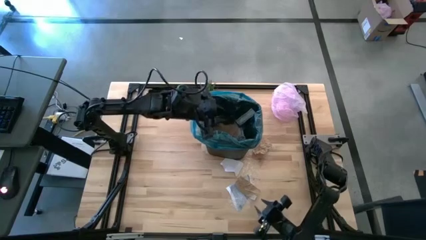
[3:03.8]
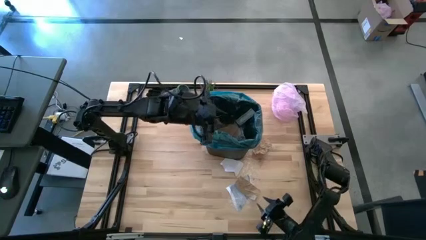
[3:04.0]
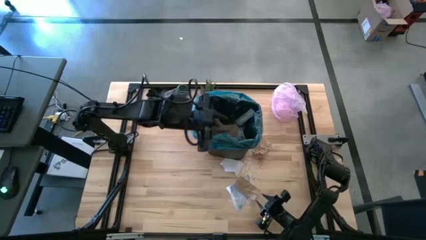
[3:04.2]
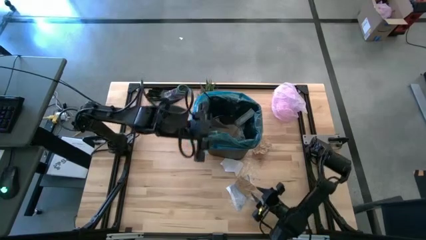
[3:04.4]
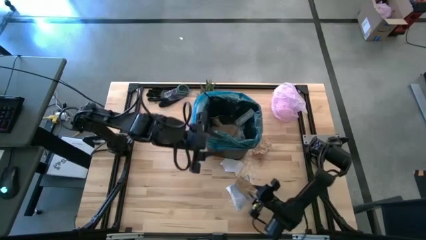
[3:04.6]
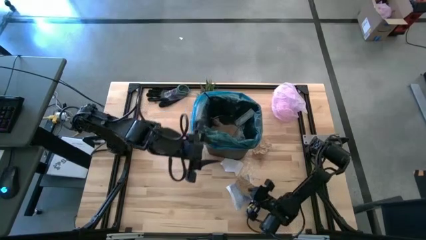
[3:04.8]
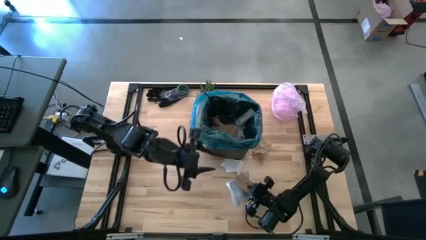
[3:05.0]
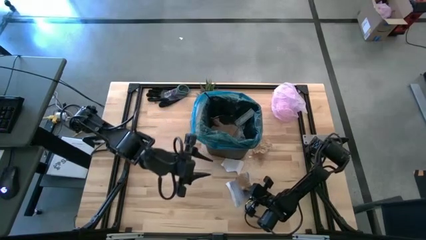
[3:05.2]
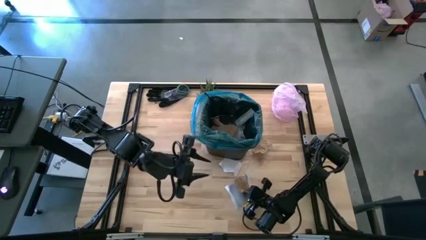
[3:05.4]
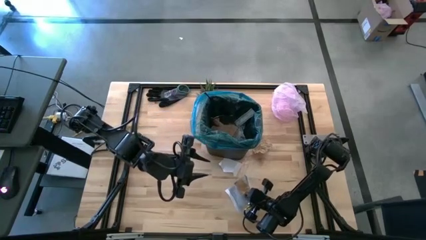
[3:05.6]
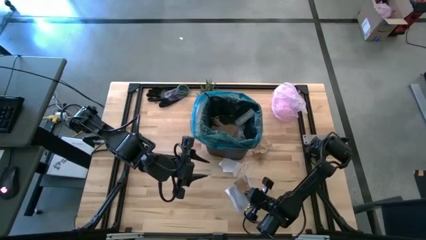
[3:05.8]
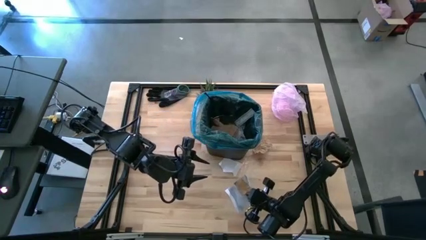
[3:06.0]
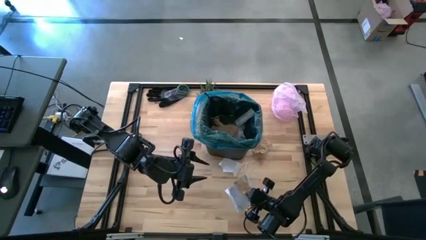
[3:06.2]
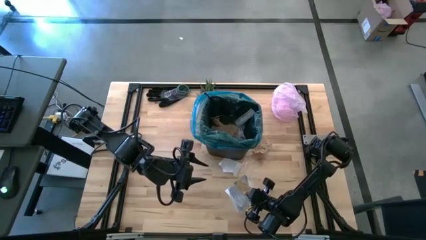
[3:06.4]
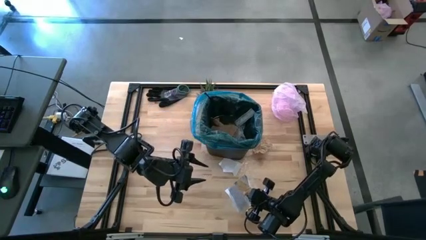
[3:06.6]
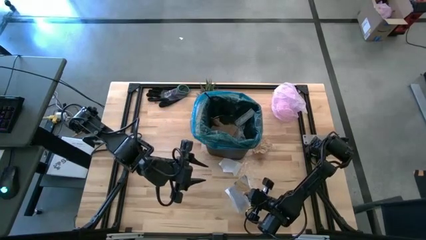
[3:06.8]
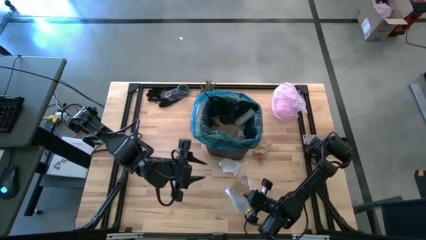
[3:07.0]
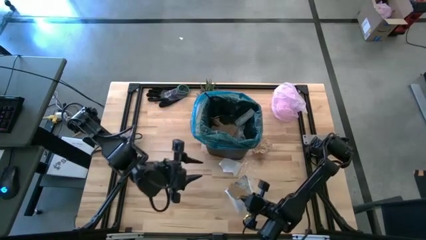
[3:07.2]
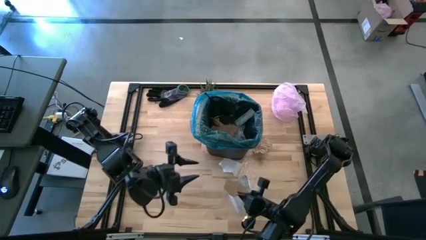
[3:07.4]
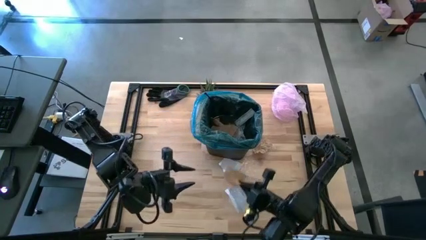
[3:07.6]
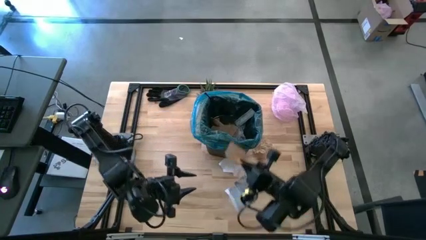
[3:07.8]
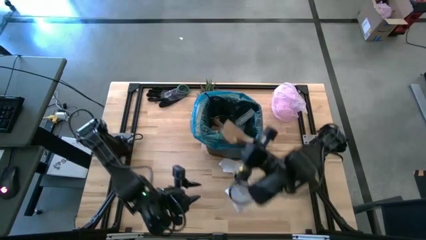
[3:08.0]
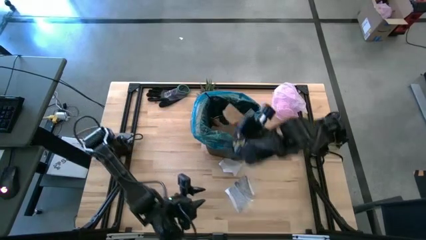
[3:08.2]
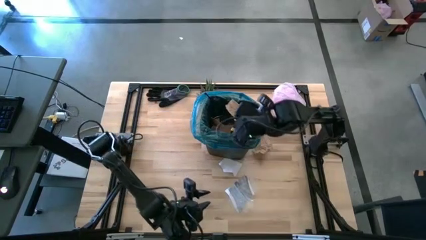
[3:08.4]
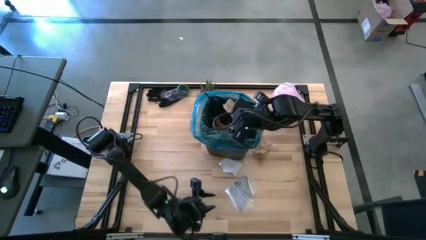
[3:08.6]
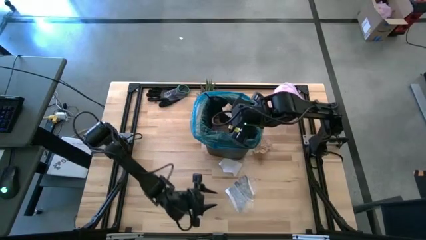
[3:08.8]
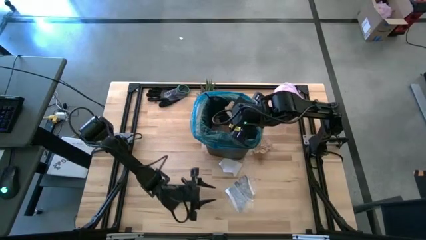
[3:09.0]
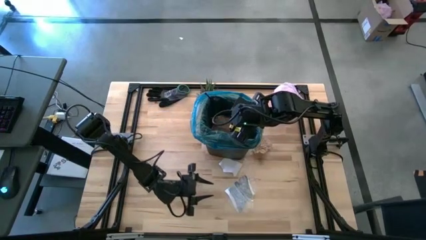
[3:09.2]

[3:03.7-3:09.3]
Task: place trash/remove bag and relplace
Put the brown napkin into the trash bin

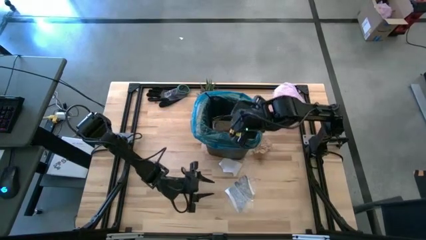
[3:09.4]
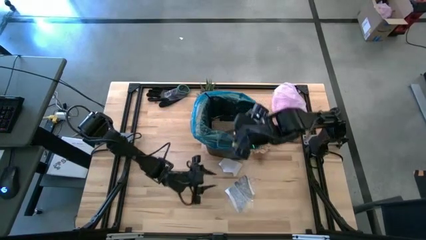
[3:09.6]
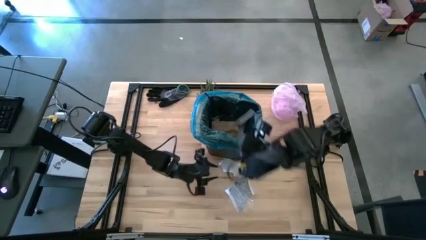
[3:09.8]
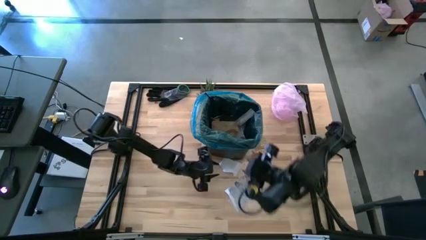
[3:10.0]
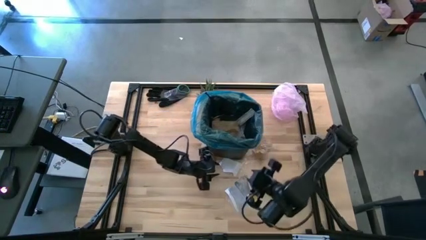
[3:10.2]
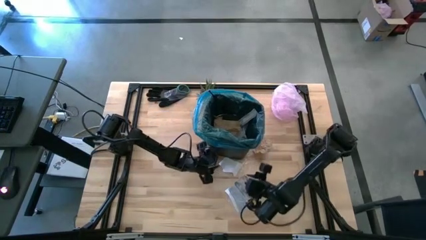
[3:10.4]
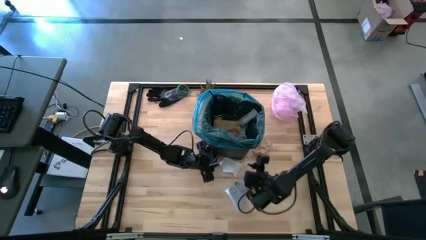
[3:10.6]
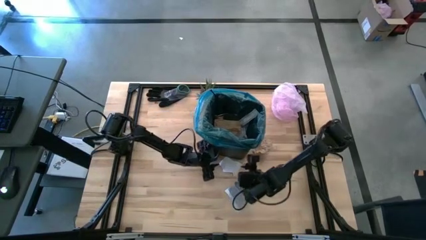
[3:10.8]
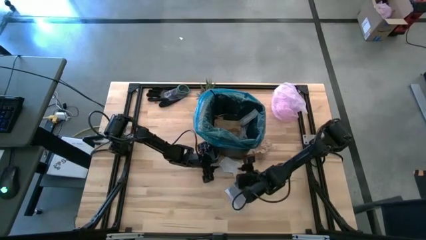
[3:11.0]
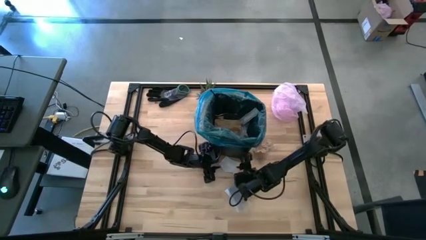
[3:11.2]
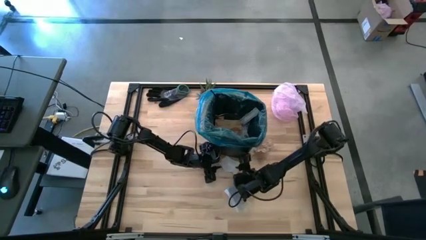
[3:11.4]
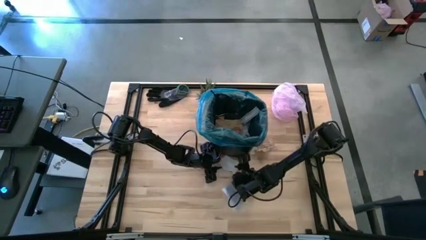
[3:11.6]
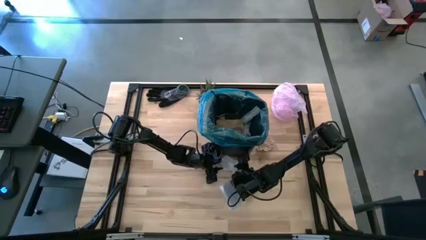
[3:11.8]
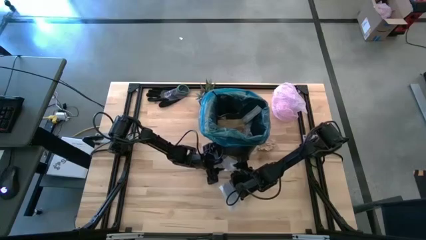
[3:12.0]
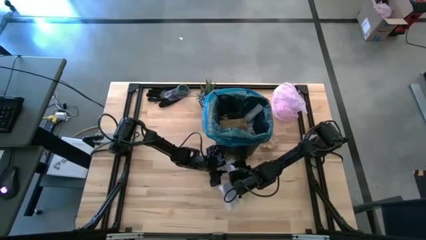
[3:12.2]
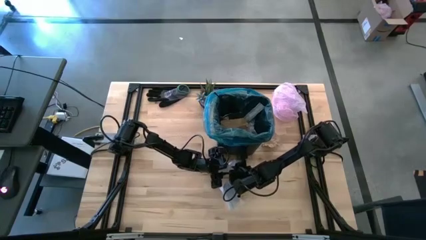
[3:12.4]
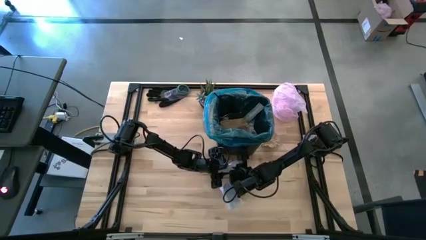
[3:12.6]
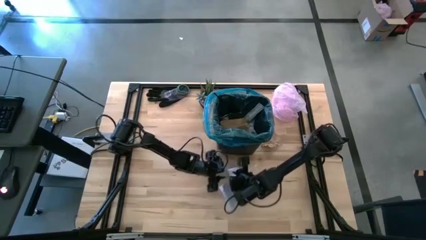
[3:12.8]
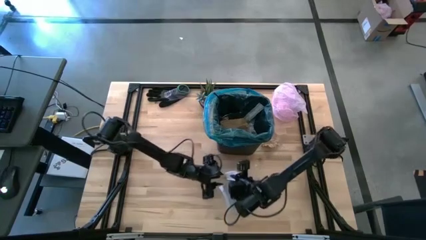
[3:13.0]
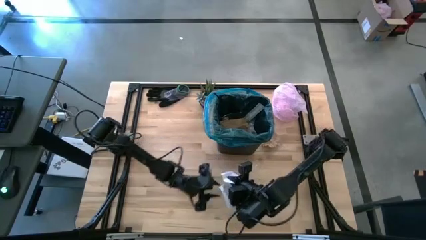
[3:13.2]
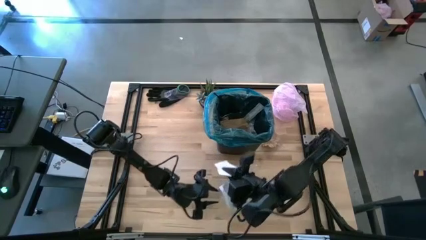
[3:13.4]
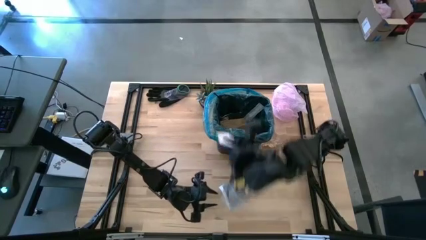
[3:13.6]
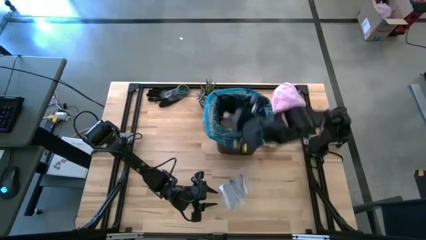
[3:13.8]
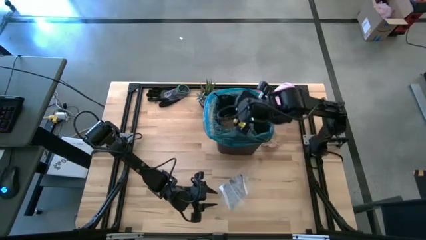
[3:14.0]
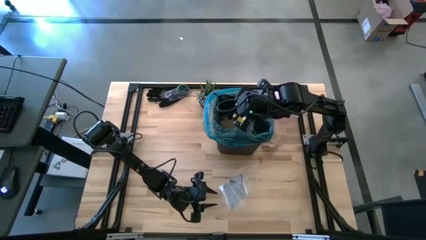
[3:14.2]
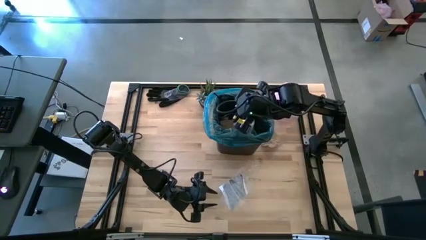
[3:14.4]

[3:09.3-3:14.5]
Put the white paper into the trash bin

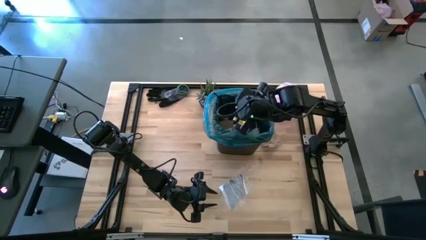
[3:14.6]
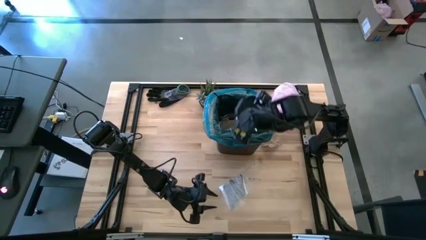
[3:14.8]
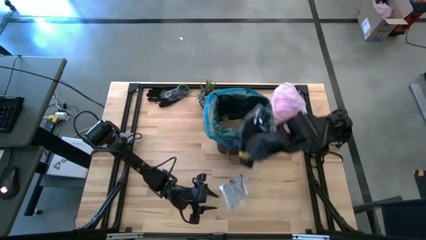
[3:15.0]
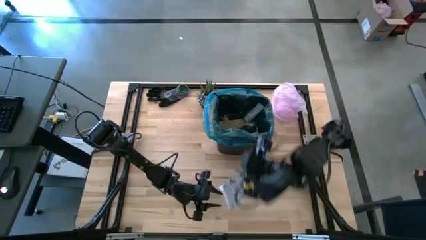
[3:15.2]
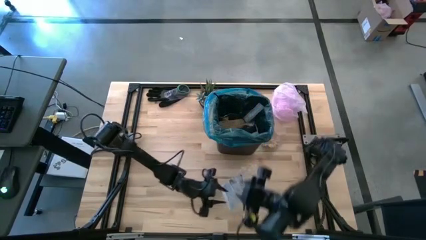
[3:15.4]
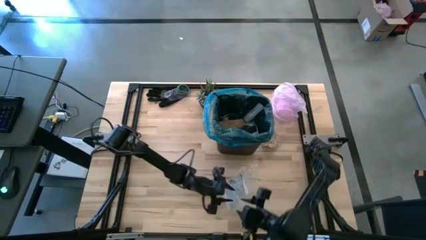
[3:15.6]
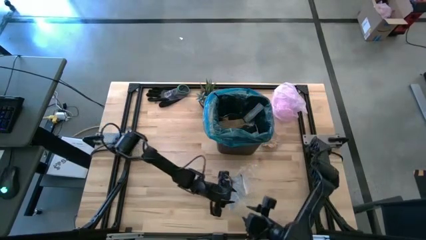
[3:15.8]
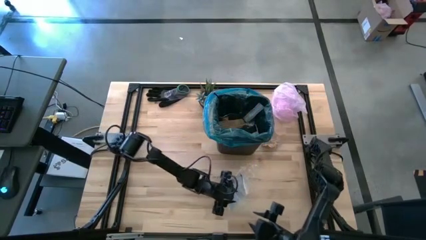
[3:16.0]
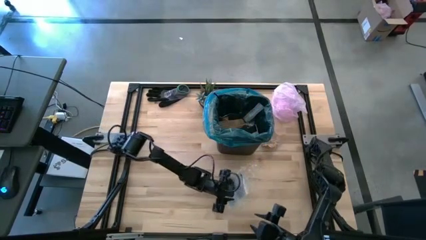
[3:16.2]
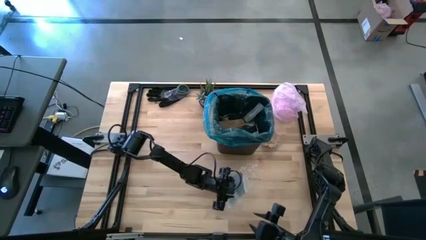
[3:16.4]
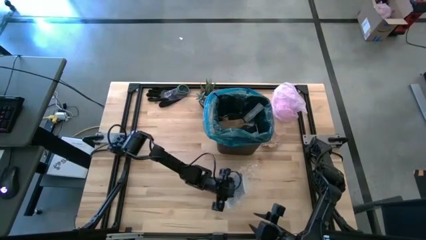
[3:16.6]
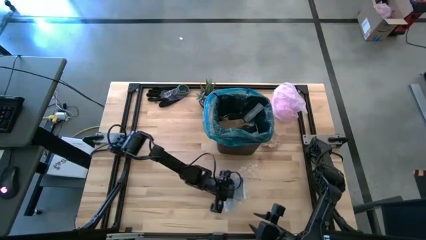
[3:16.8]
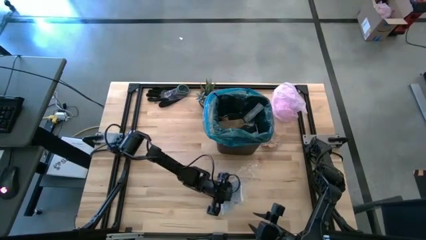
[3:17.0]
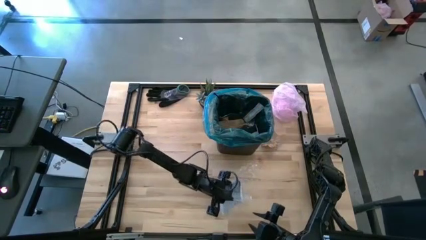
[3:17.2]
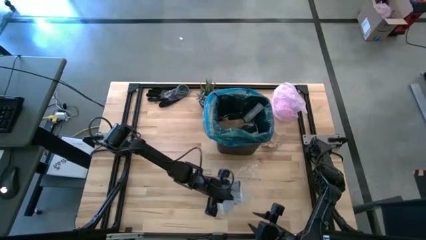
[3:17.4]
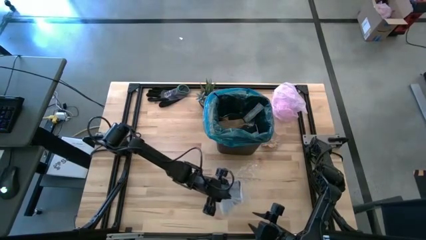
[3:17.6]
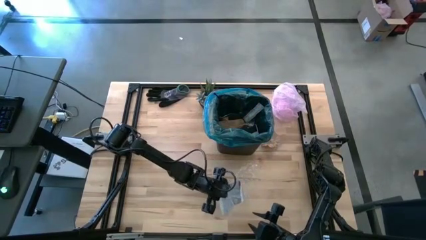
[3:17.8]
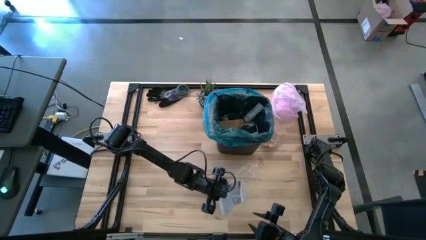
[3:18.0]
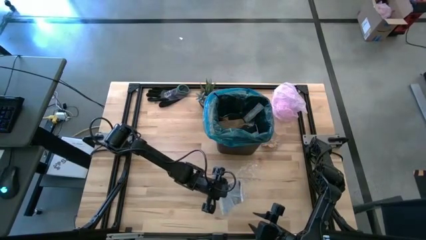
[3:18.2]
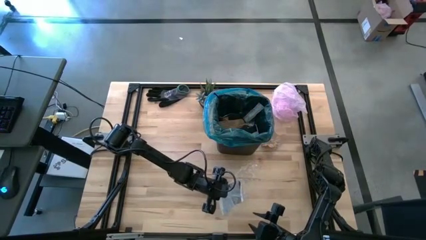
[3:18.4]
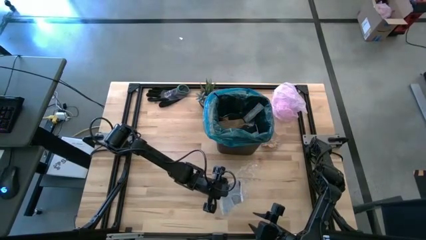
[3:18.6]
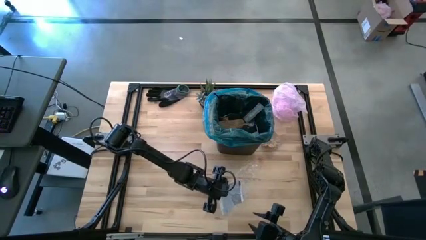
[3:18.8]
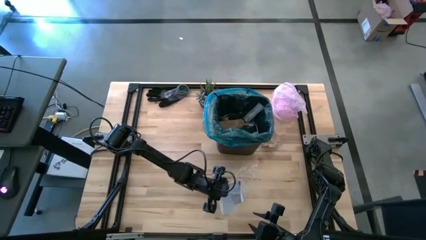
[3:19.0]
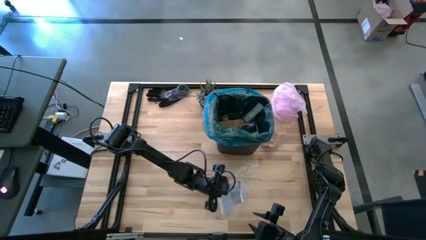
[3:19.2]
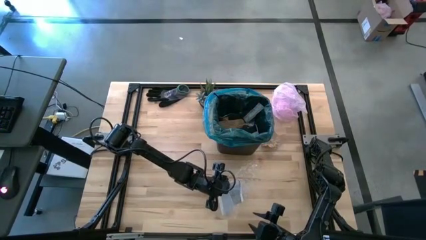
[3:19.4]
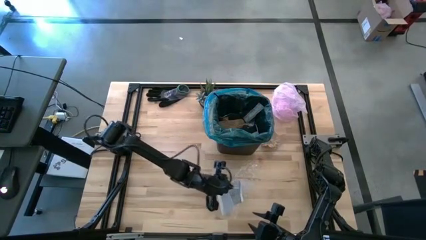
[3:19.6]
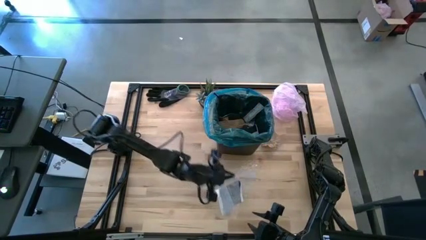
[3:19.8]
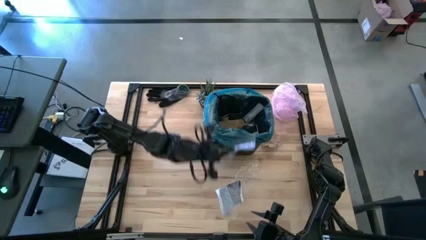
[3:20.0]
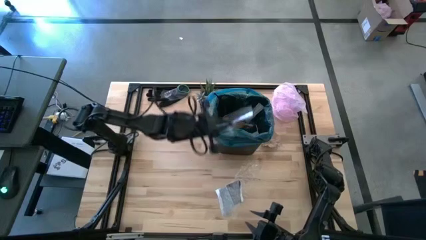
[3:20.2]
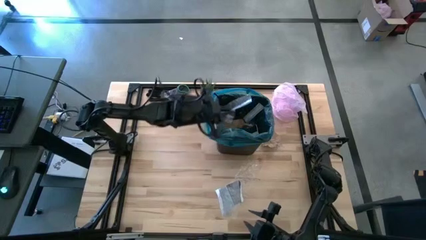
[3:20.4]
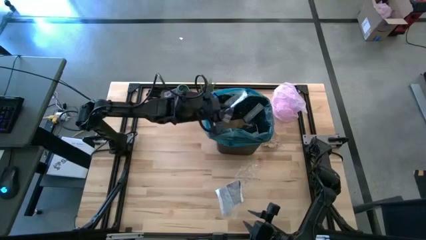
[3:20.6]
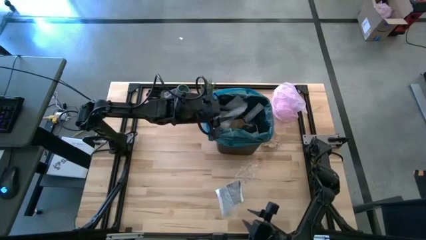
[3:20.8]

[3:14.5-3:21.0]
Put the transparent plastic into the trash bin
